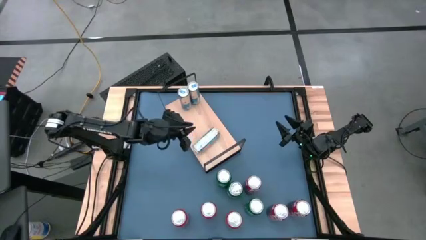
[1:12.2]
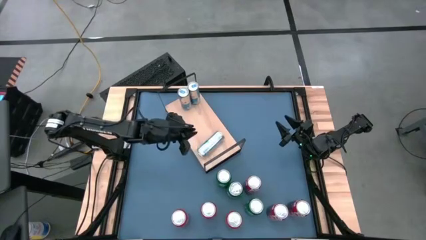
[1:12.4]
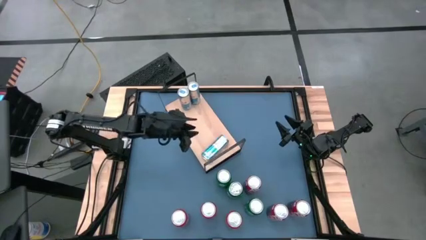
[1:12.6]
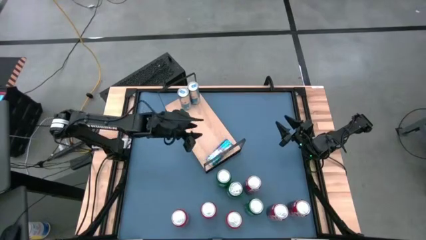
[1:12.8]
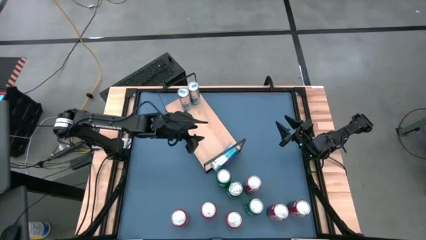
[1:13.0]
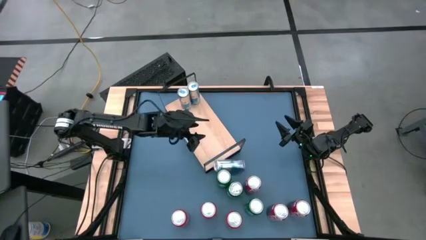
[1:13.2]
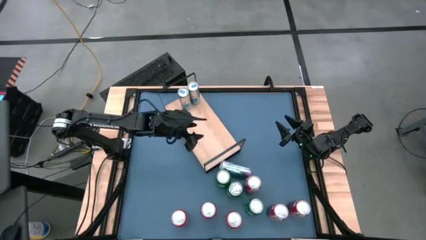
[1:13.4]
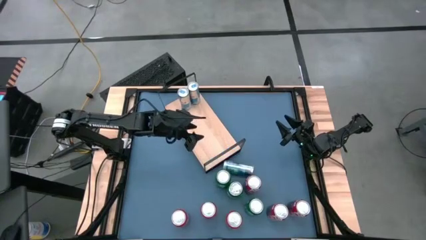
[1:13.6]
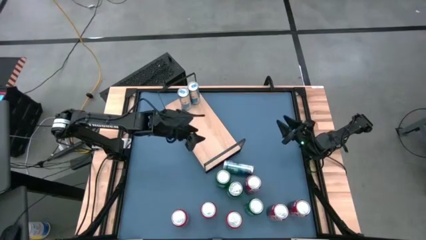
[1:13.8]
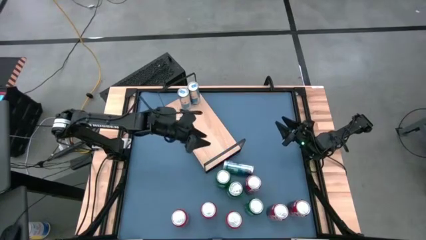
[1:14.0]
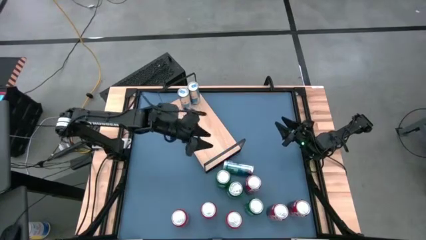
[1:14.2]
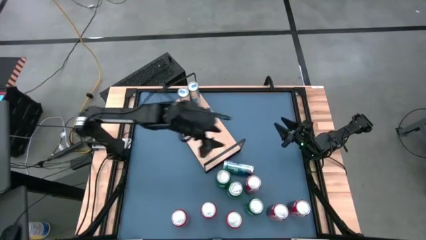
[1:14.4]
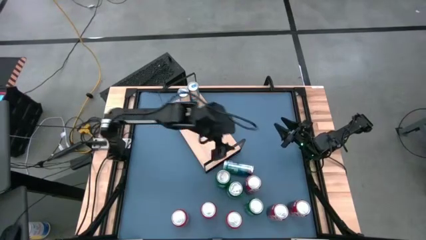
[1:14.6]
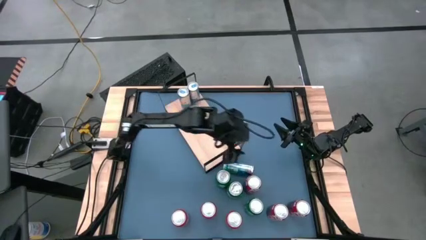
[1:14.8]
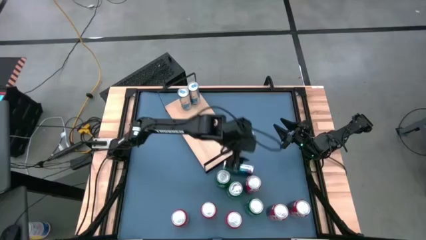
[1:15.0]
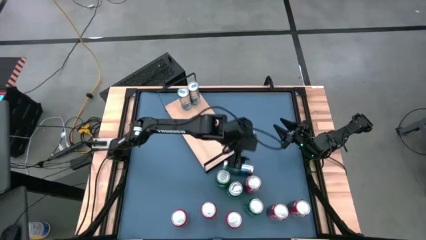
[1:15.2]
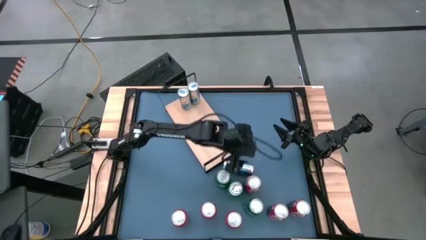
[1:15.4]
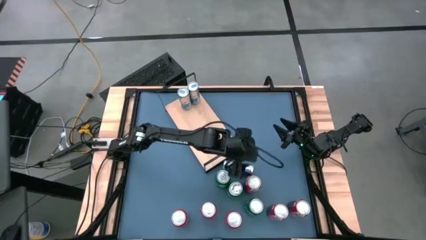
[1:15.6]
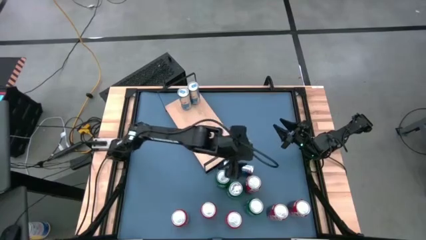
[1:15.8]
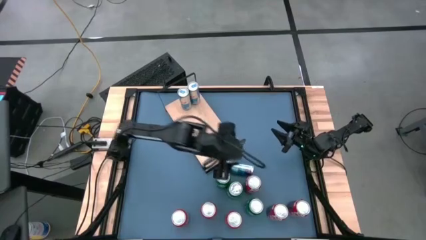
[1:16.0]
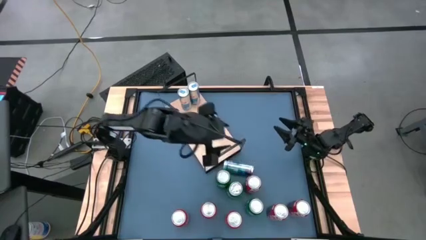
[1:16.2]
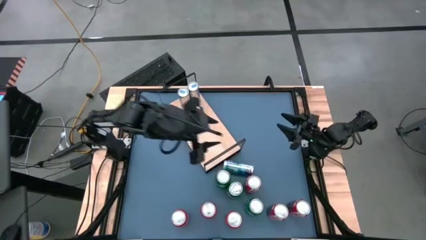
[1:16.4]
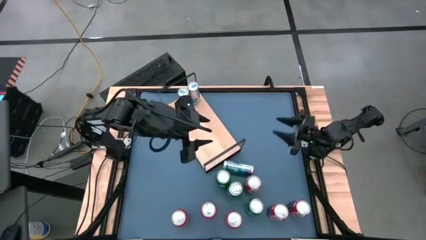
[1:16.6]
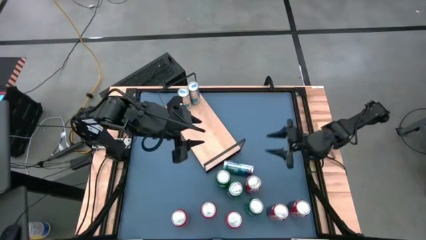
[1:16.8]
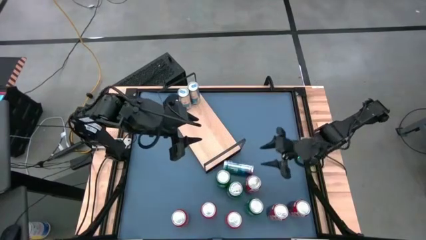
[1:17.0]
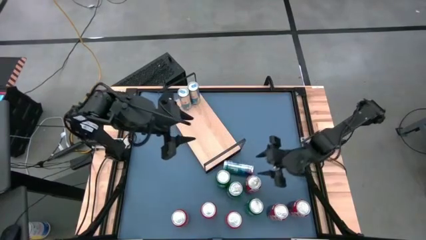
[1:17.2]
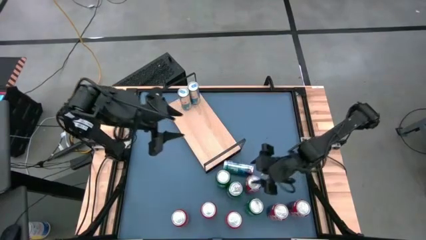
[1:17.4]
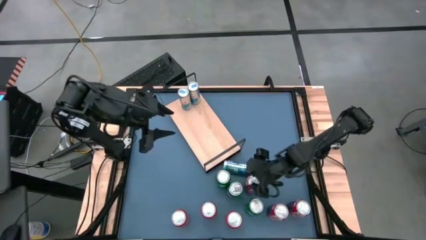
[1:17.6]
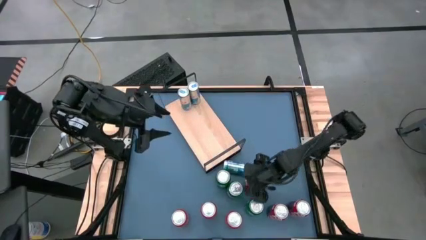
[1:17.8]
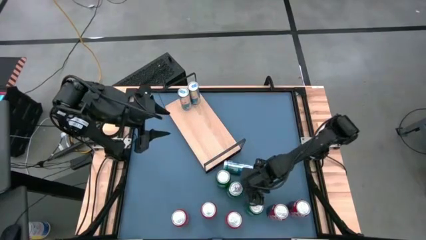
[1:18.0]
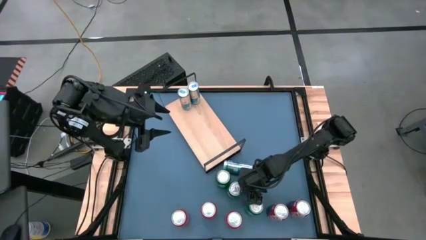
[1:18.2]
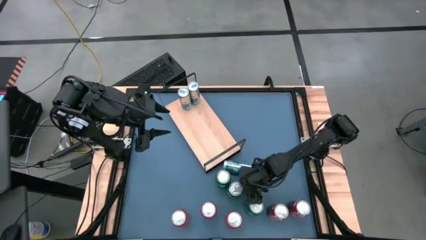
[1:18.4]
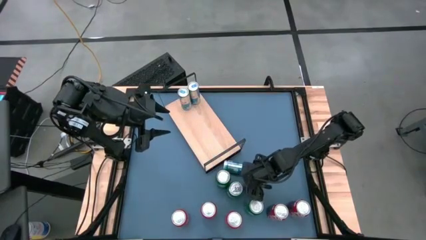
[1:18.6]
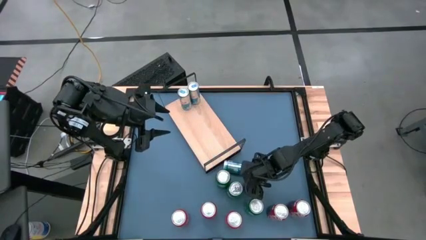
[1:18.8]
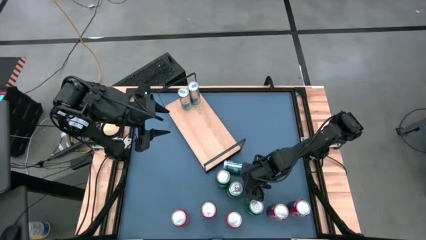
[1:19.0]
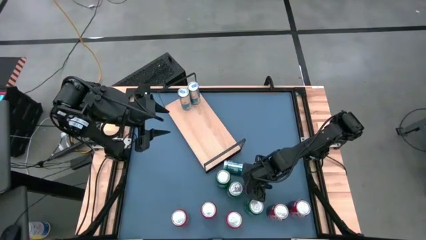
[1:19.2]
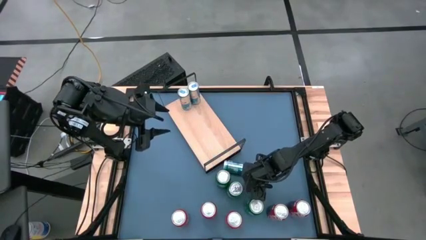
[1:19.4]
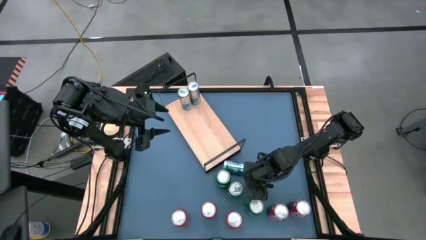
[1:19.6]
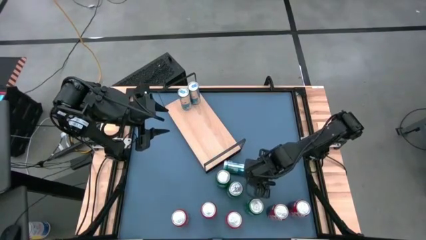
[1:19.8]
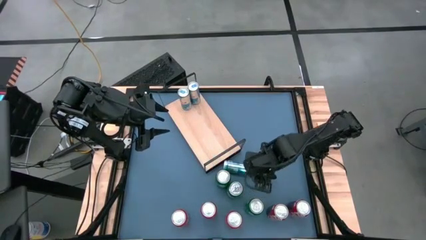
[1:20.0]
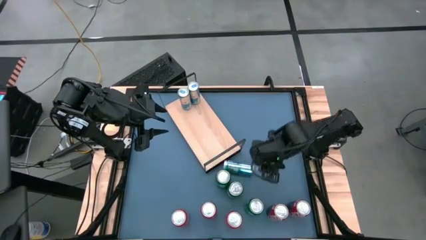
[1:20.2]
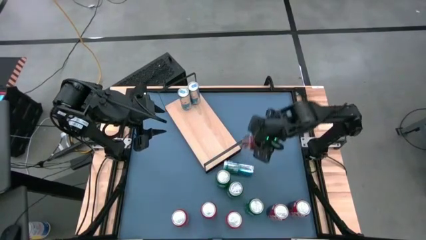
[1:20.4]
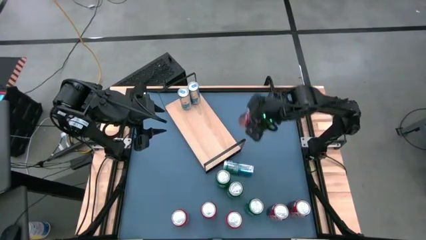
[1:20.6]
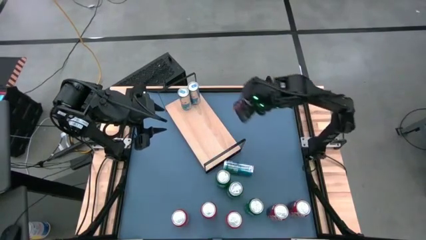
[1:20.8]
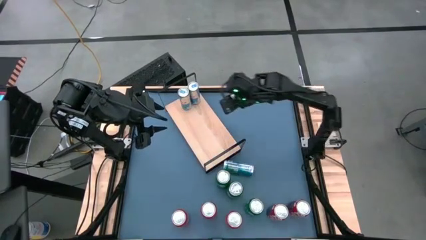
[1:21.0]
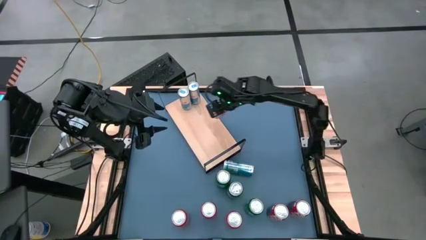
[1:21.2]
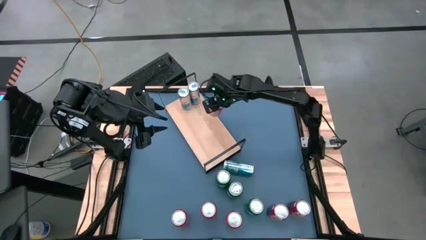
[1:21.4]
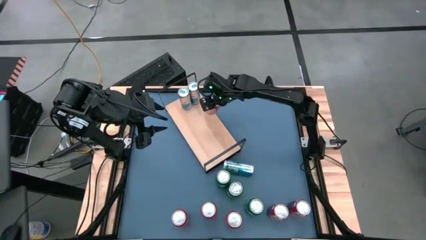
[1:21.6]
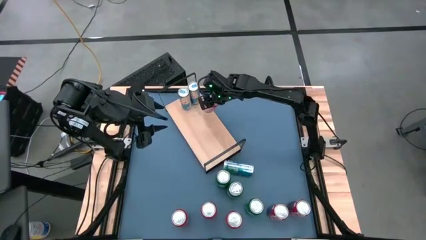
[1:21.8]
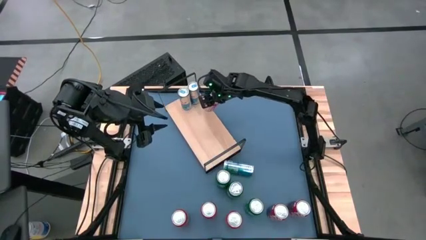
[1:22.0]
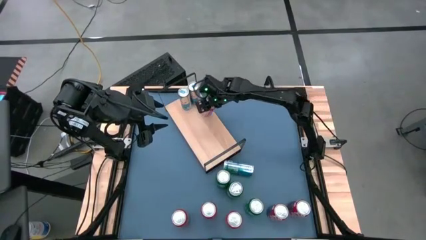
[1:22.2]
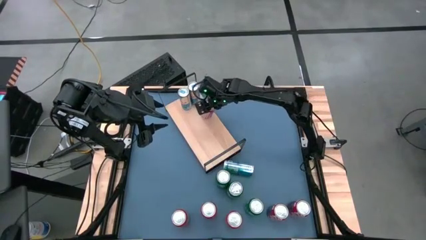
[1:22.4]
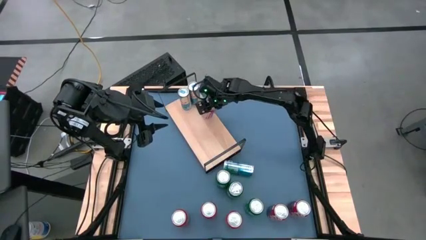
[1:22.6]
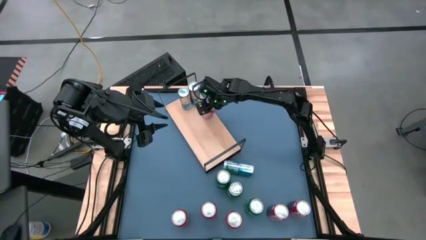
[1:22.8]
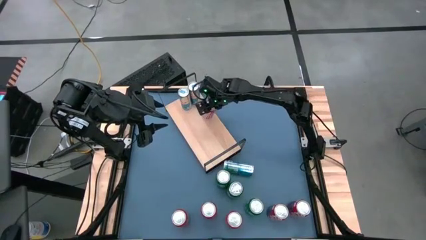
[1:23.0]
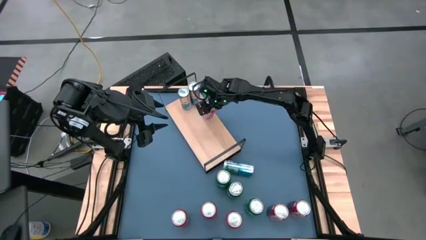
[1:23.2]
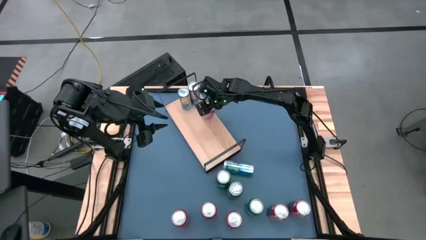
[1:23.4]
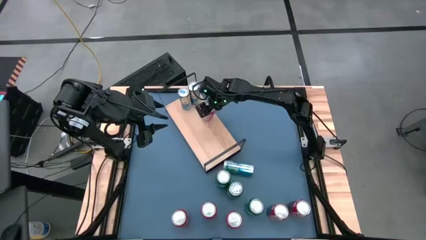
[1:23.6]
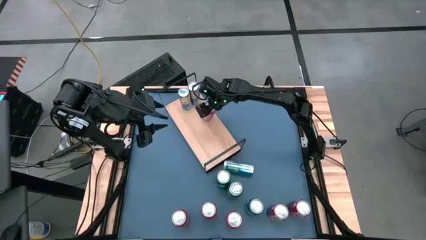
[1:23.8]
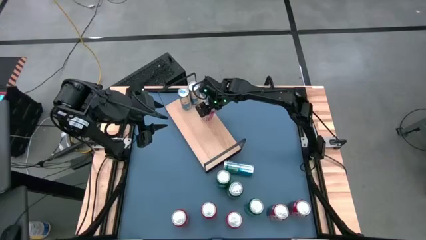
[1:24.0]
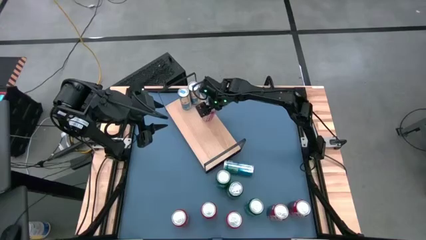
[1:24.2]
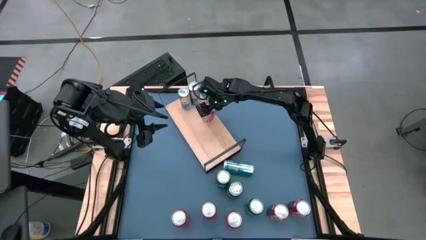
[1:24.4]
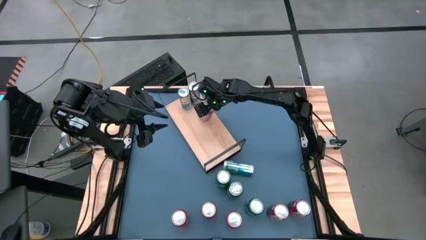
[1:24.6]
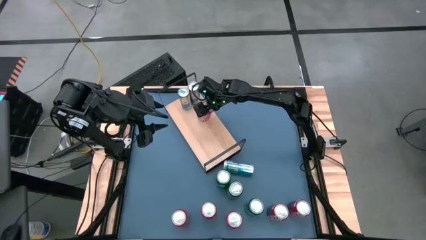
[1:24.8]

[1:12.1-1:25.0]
Task: Place canned beverage on shelf
Put the top left red white soda can on the shelf
